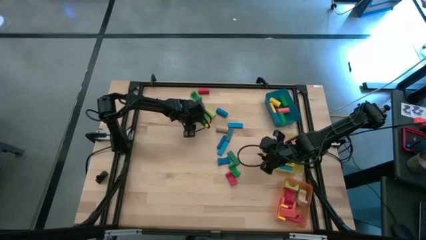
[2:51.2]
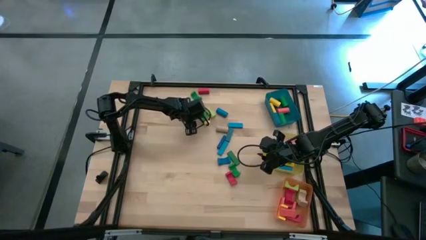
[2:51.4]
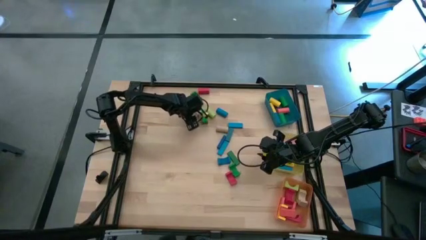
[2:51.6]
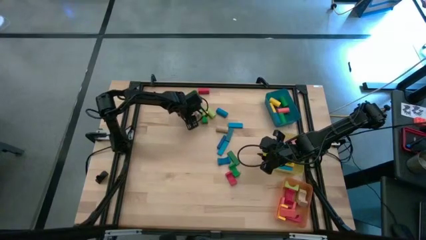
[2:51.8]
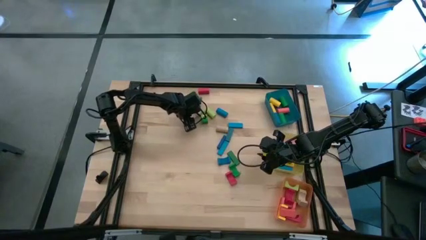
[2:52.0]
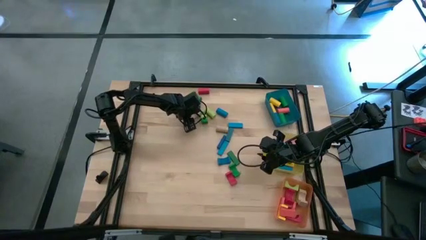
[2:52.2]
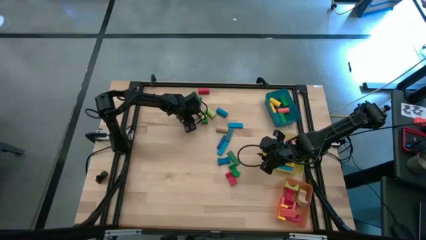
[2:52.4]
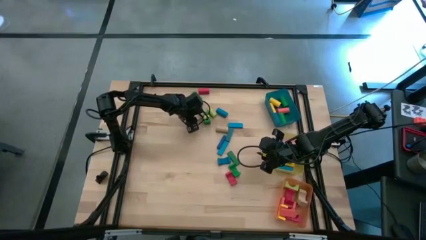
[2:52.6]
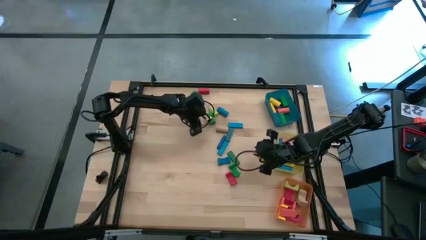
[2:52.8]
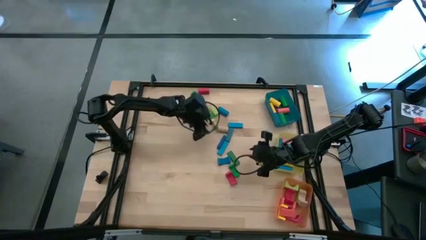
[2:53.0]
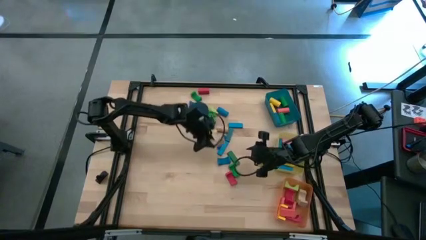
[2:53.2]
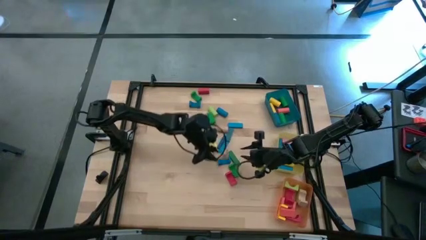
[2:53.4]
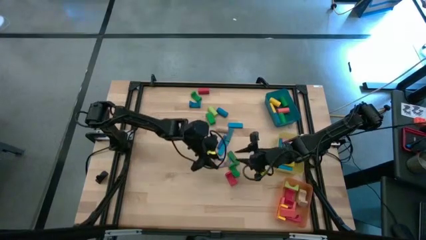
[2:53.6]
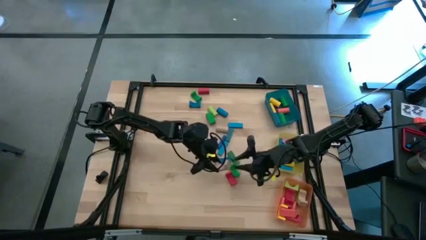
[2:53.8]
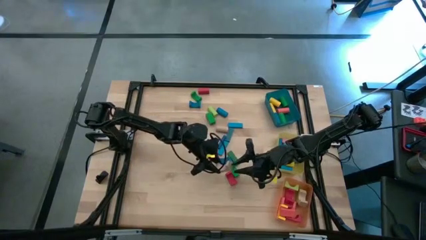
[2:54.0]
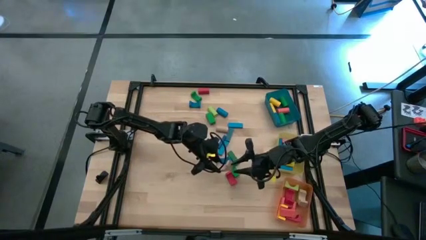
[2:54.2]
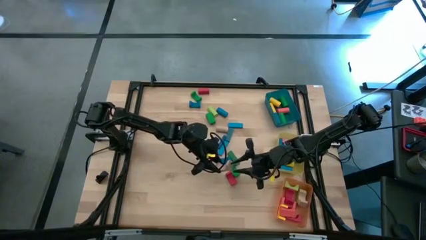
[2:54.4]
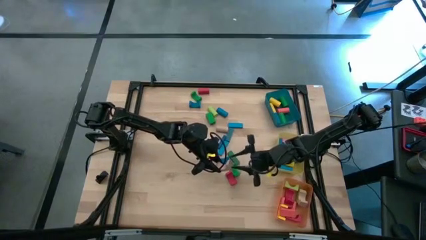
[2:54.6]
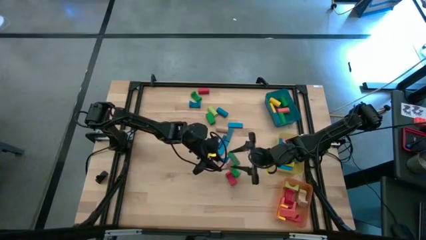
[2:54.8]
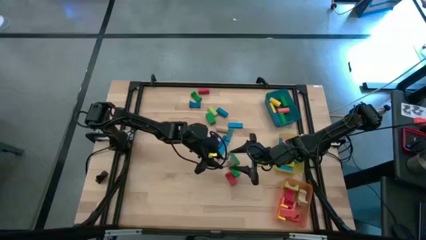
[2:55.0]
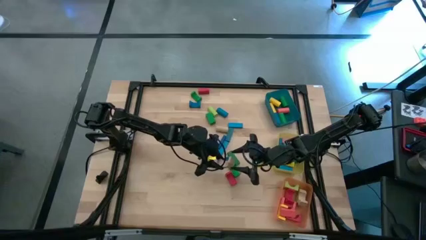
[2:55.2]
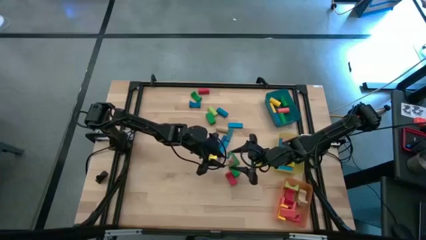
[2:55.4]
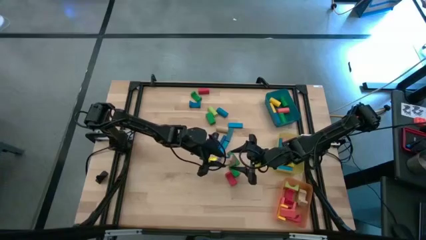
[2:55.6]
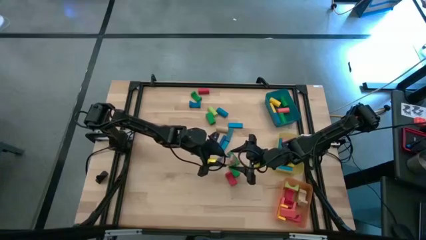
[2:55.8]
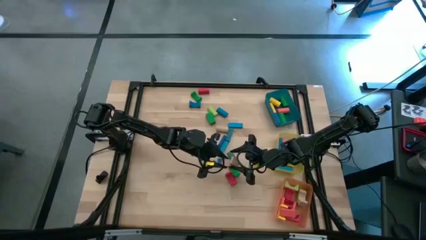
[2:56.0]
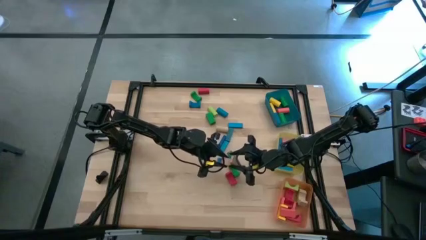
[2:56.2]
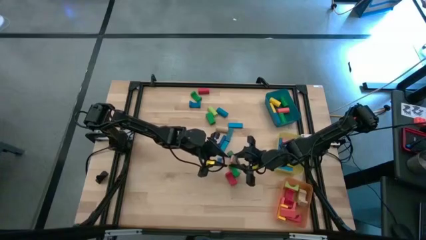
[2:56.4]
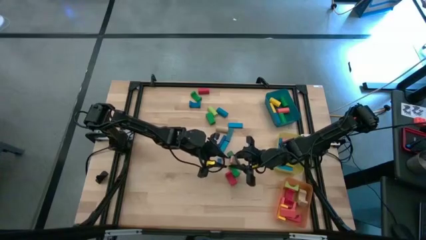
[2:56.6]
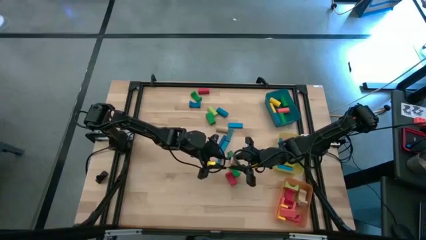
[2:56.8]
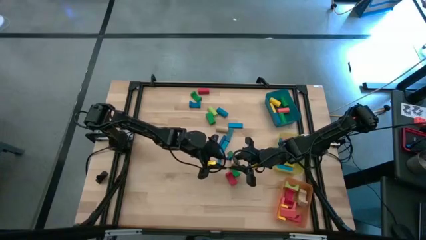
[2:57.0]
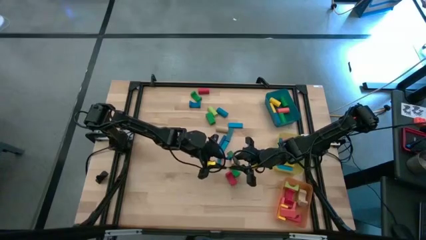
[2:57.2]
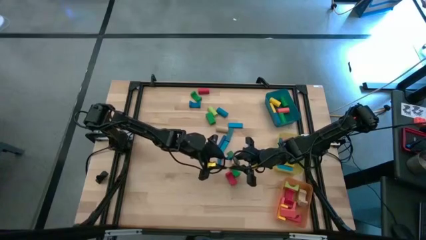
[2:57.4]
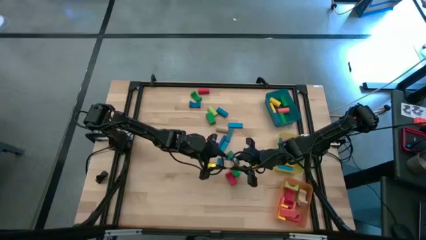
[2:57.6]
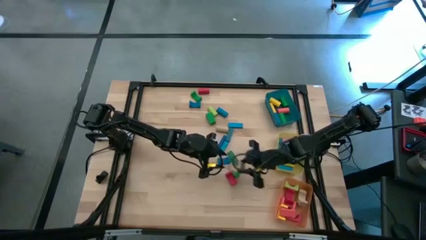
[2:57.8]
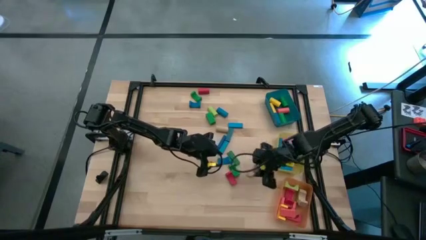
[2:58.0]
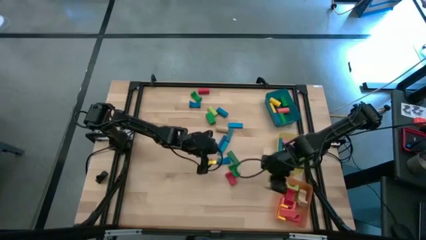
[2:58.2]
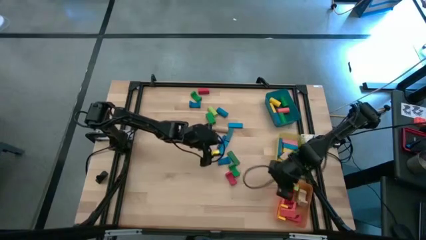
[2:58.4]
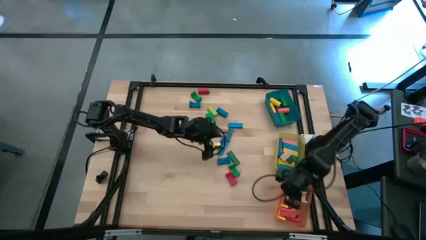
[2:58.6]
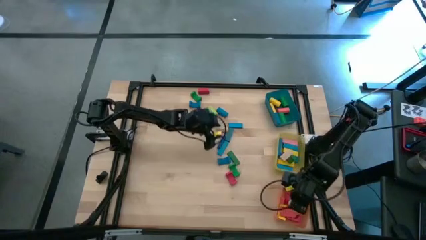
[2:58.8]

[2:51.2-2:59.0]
Task: Sort blocks by size
Put the brown arch block into the orange bin

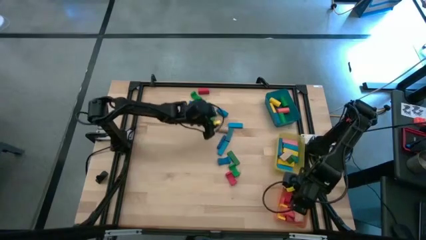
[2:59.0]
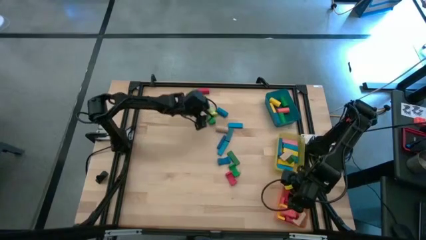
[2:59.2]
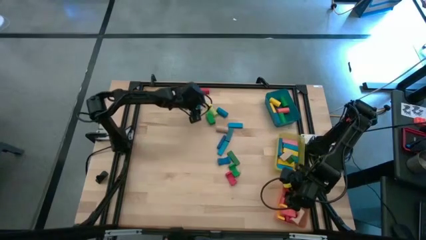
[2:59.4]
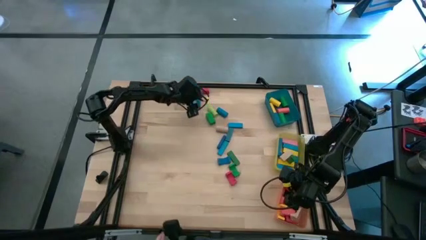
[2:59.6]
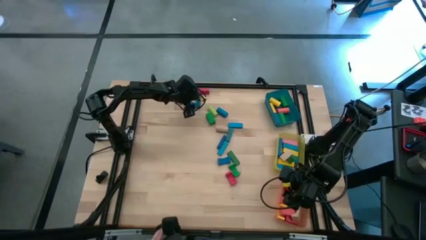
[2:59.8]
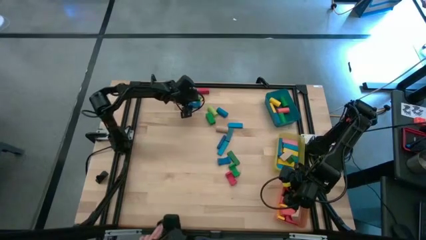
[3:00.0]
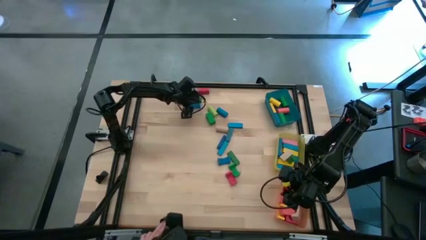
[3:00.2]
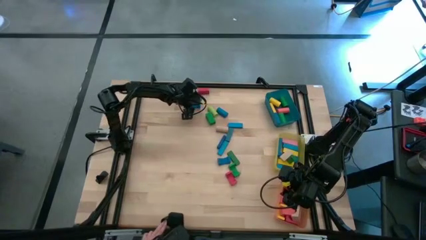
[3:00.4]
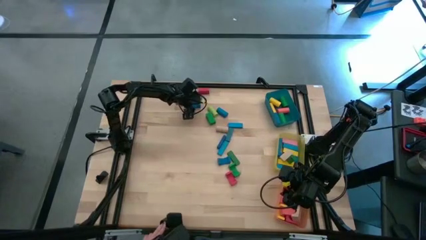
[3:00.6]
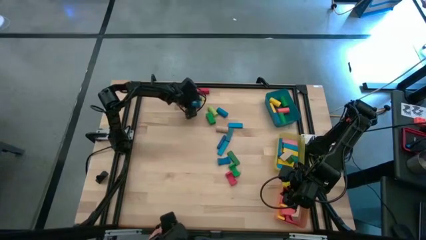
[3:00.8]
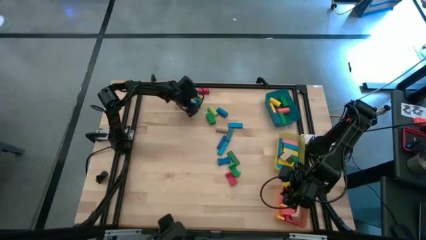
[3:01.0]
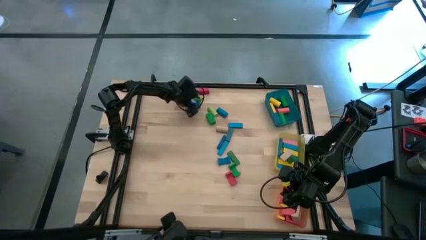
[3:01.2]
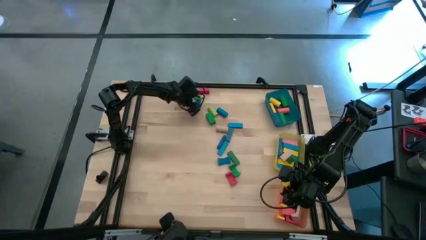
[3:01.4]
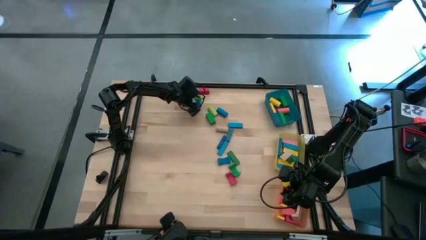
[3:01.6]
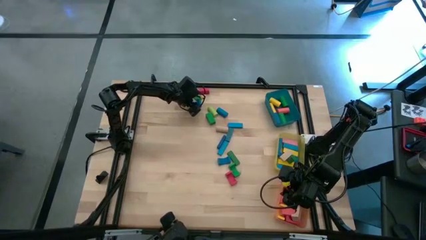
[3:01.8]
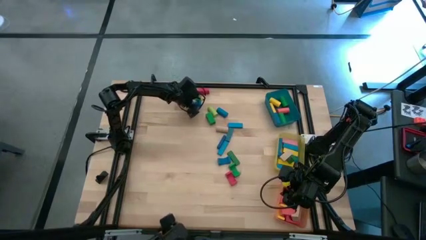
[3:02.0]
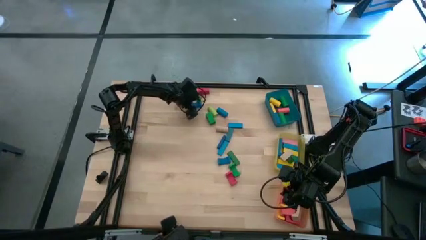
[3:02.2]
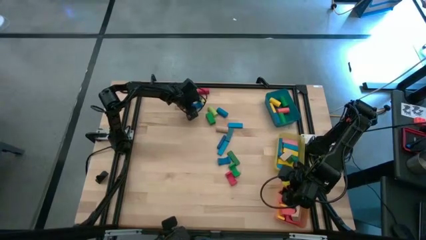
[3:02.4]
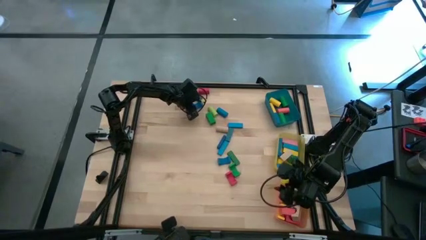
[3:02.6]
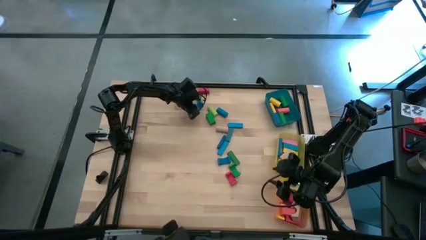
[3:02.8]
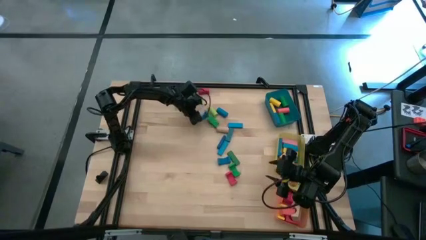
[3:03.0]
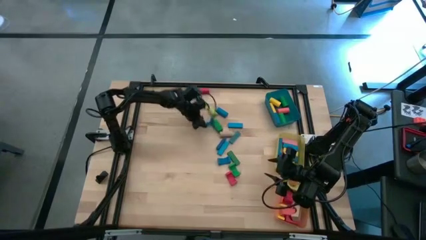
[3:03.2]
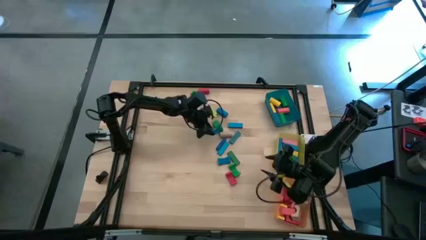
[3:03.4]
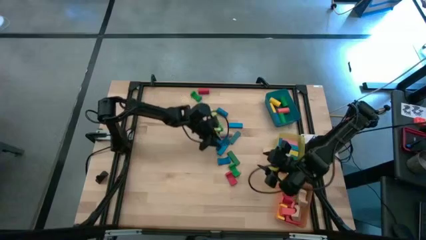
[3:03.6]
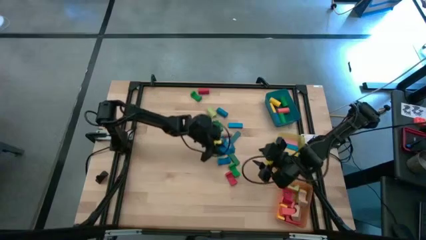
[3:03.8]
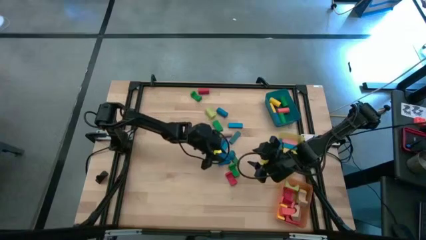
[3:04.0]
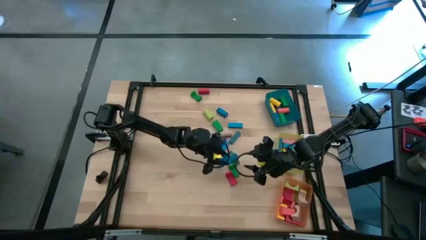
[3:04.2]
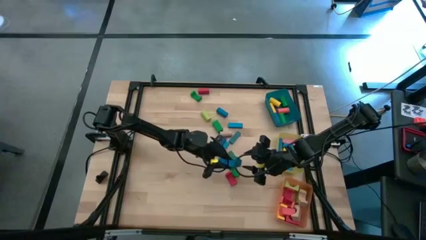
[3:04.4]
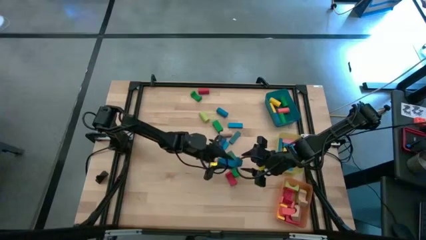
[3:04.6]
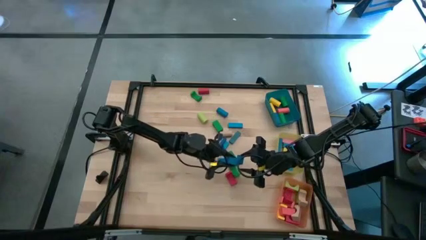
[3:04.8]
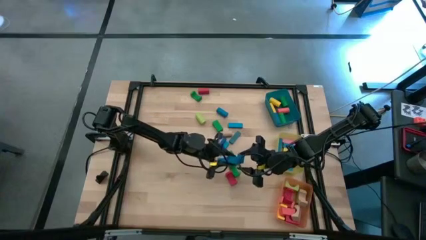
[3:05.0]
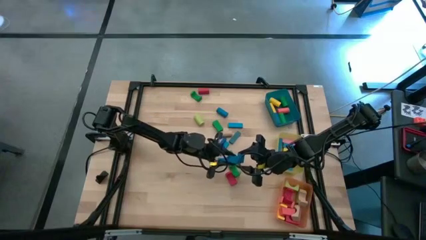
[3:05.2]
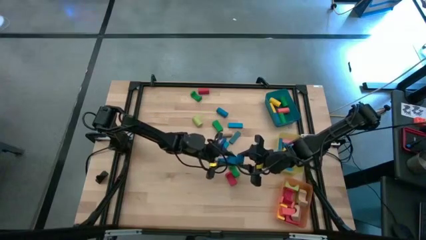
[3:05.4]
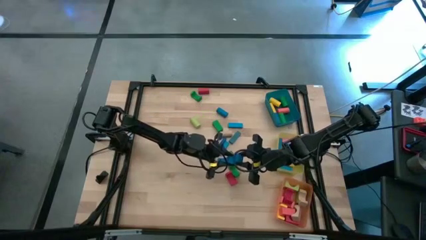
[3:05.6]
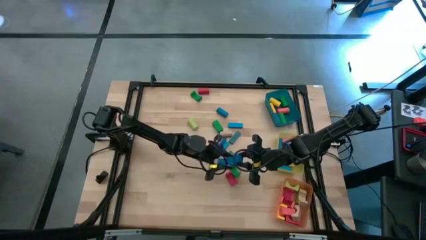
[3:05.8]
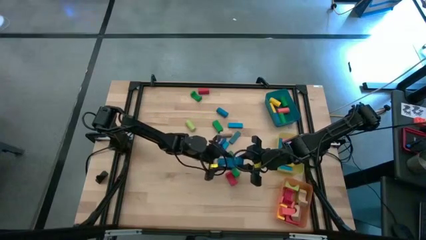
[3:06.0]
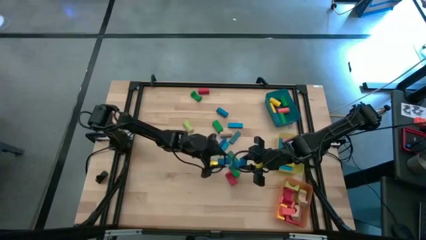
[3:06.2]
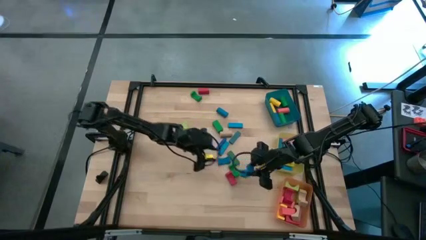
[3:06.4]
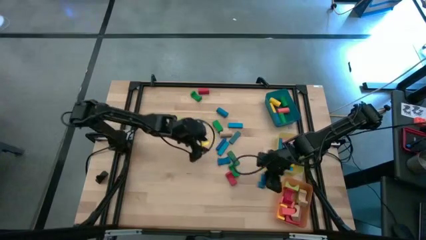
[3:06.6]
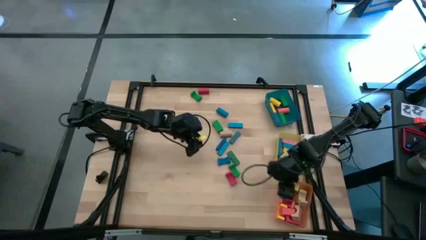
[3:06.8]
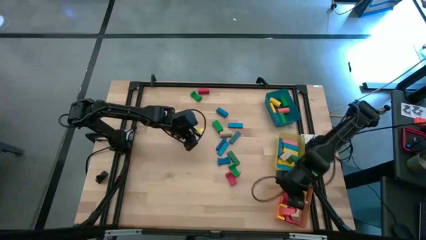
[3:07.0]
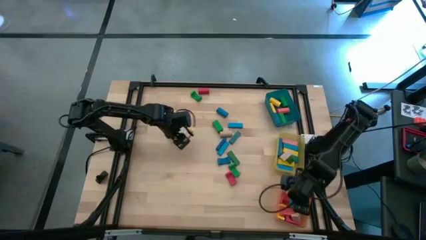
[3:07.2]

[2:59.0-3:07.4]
Put the blue arch block into the orange bin
